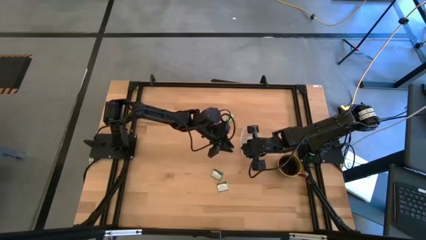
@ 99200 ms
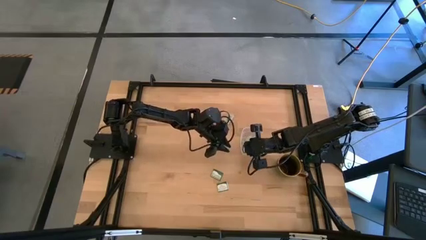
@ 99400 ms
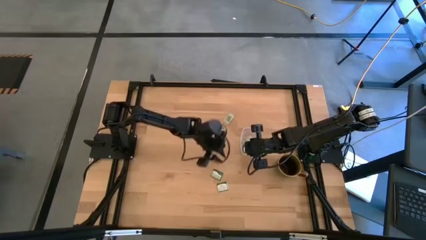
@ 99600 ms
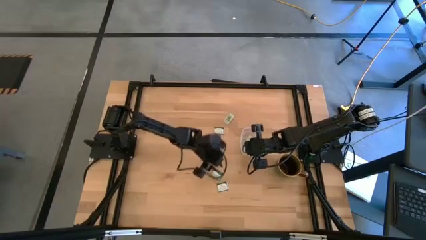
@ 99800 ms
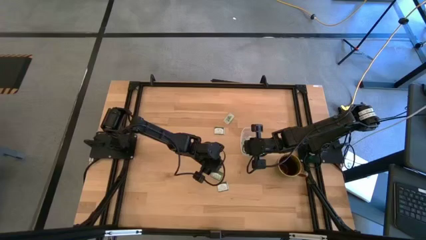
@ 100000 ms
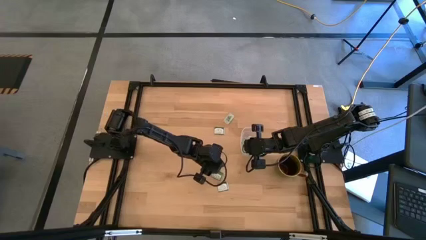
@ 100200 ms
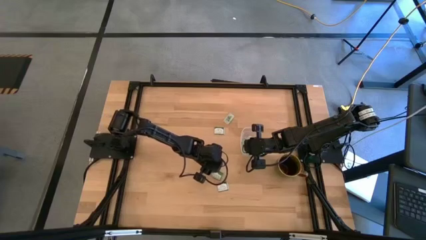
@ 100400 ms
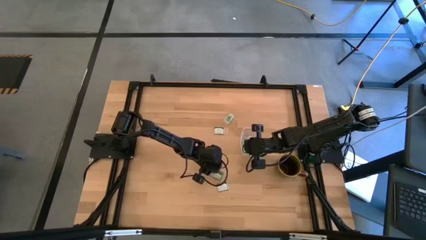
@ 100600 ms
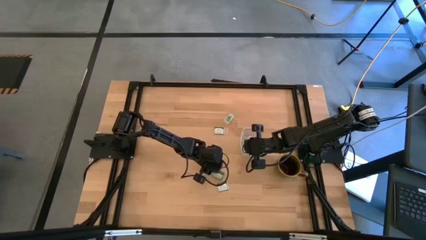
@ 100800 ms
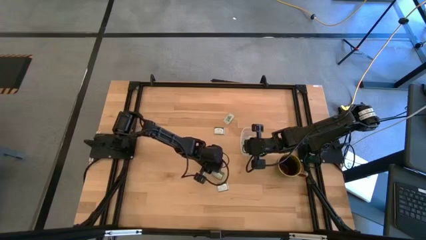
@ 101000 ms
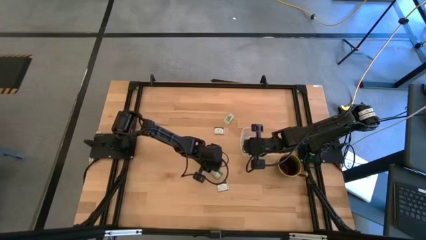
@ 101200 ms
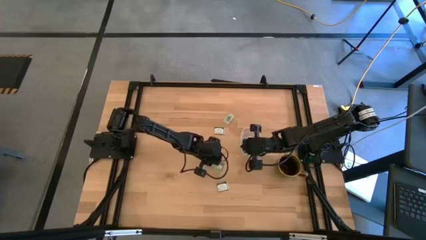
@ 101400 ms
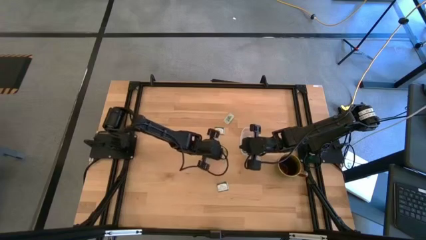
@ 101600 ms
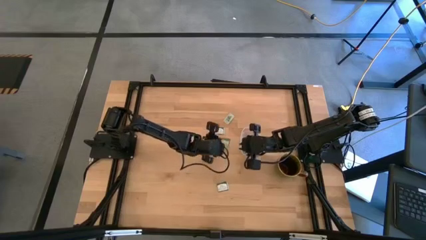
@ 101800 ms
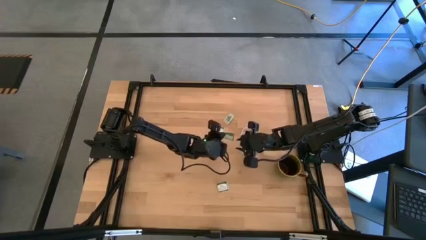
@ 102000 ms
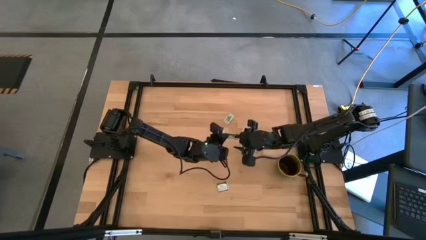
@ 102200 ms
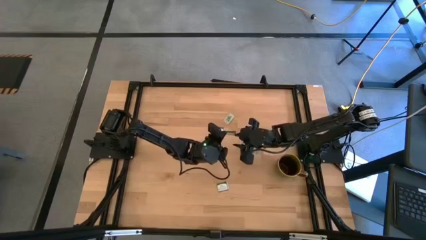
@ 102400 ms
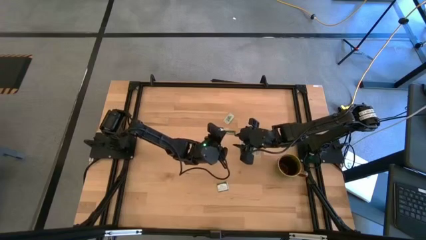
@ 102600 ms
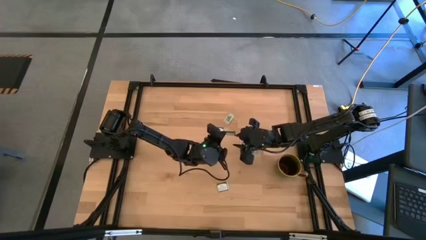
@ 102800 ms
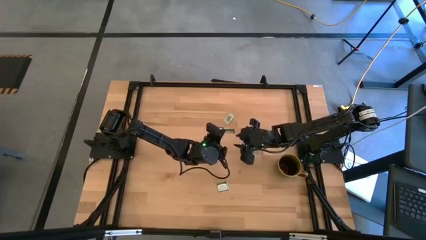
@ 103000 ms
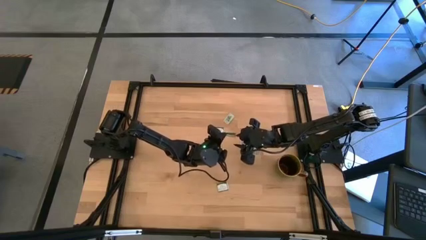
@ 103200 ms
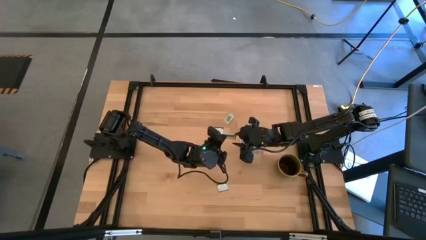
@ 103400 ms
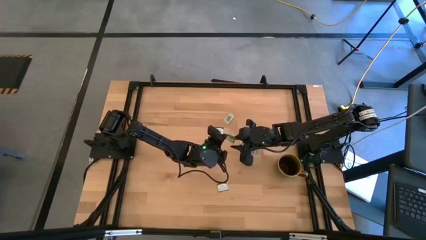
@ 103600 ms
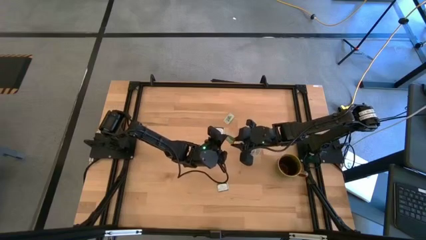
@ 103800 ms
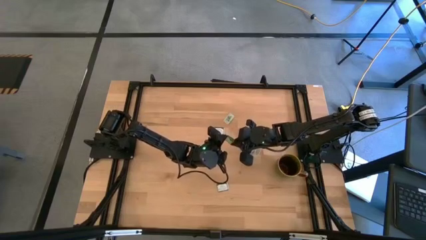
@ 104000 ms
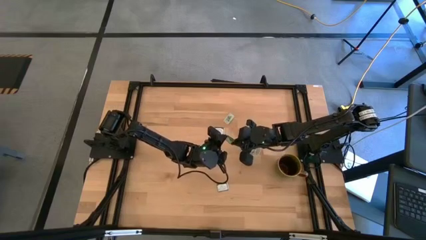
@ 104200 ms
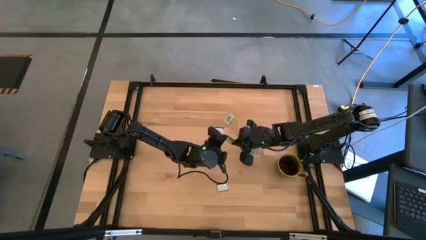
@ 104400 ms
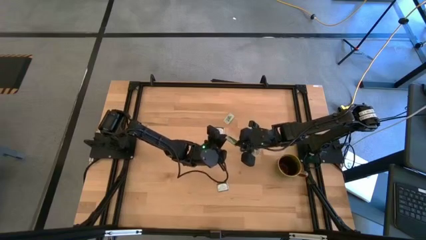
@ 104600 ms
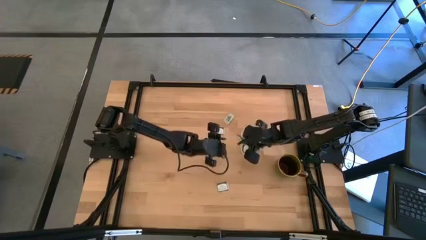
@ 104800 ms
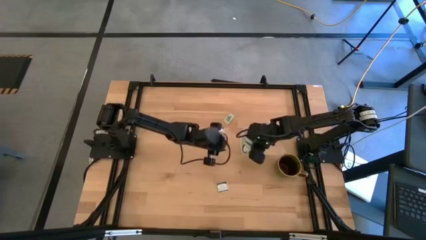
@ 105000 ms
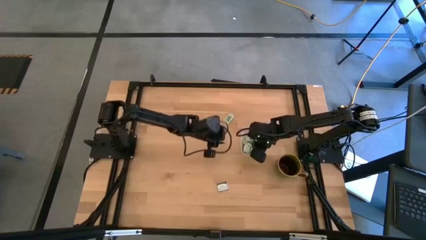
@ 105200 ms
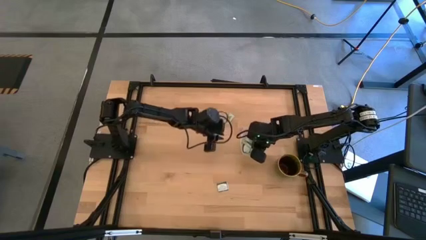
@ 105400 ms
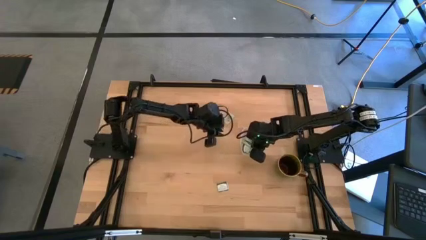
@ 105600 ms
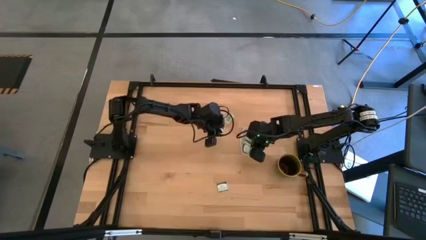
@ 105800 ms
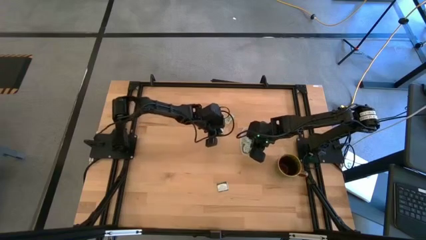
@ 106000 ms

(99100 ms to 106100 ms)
Task: Pick and place items into bin
Put the truvia packet into the transparent bin

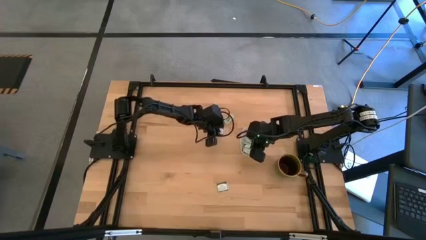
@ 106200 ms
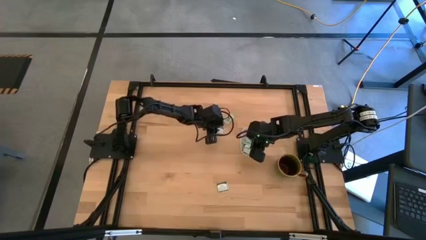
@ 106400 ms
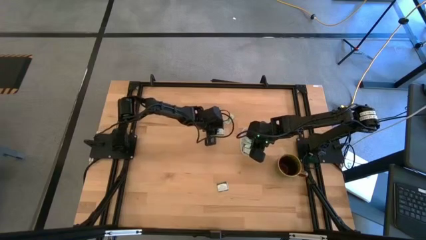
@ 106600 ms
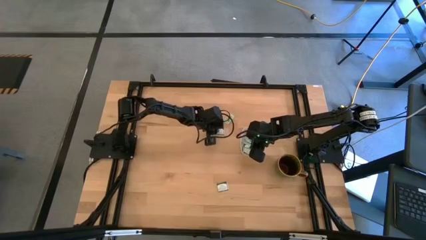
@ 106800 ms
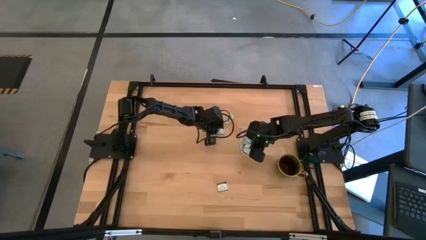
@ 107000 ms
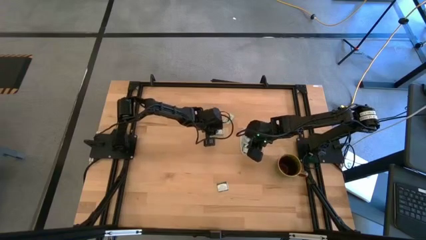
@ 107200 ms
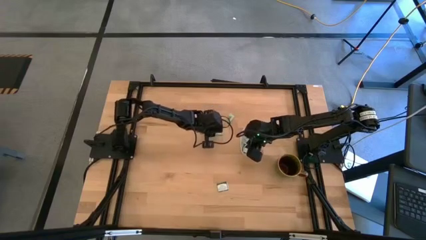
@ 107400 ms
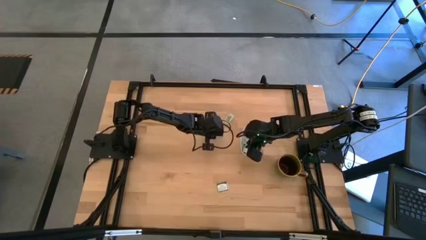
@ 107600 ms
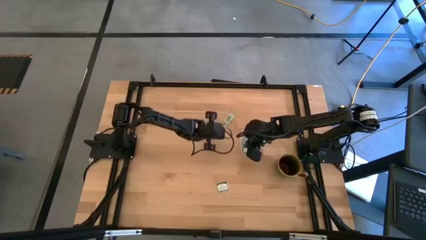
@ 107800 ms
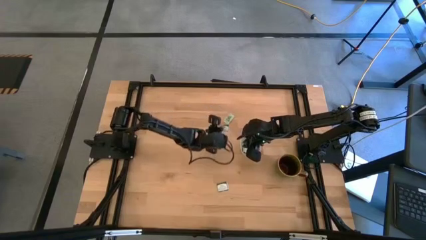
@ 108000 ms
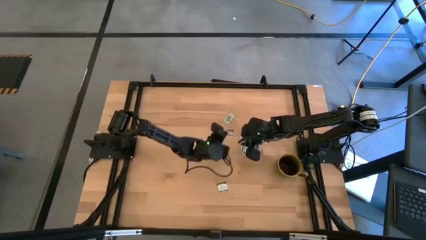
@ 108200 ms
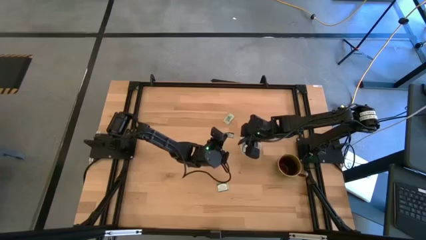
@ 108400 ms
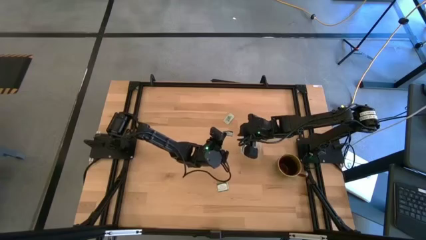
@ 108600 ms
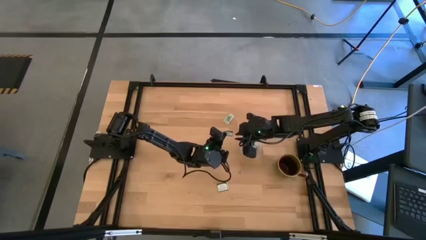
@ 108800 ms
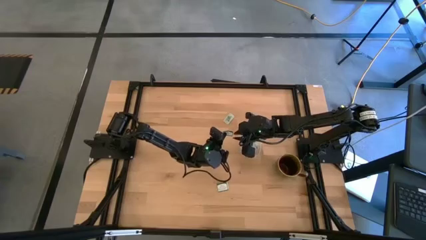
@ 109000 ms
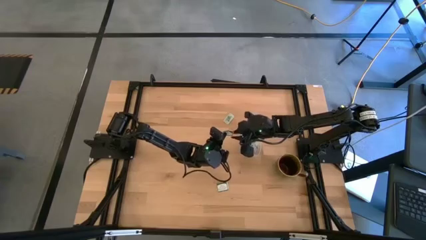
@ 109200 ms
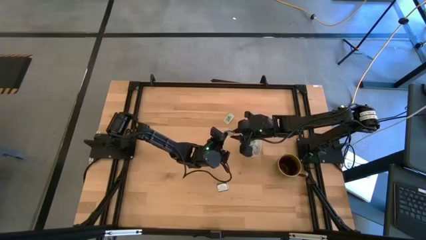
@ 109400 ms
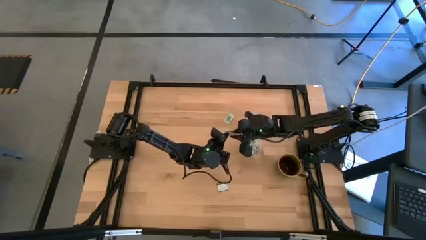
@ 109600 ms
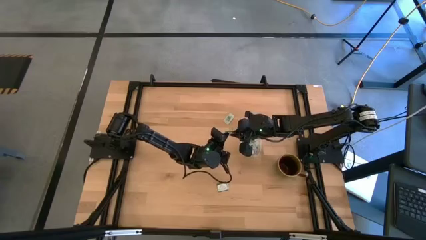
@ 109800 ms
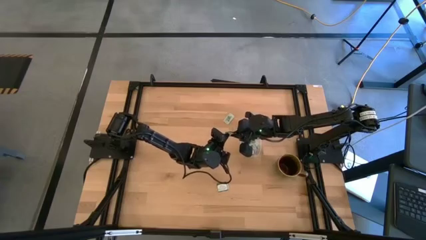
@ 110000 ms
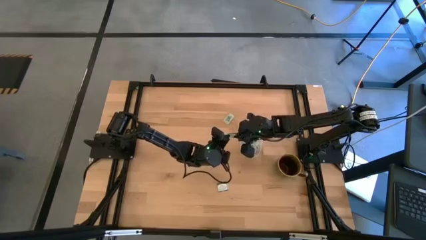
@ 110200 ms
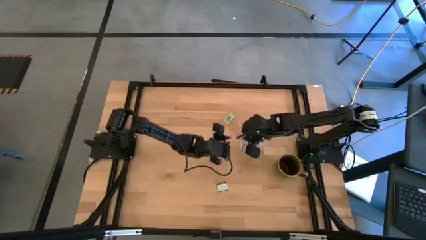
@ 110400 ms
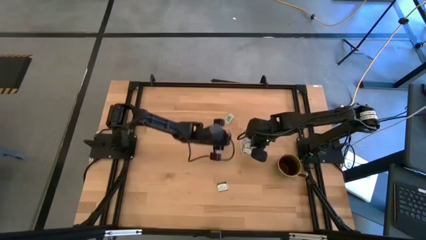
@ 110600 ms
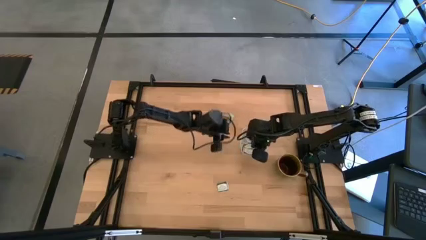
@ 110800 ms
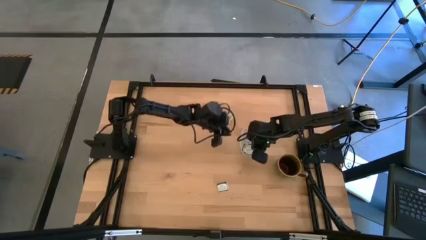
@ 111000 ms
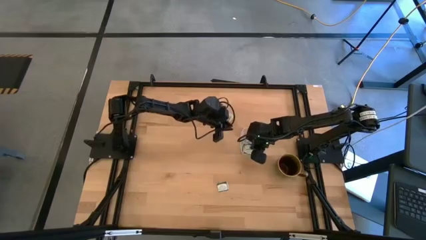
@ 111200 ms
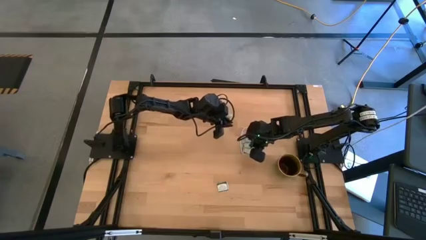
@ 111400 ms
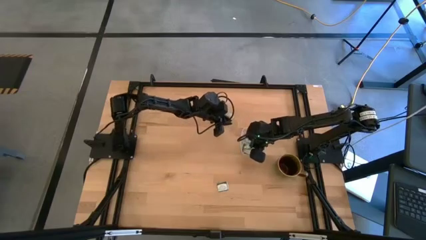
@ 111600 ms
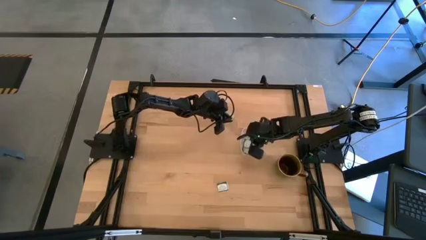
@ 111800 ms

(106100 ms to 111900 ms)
Put the truvia packet into the transparent bin

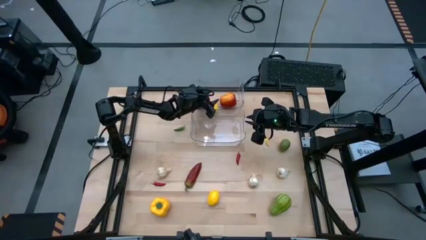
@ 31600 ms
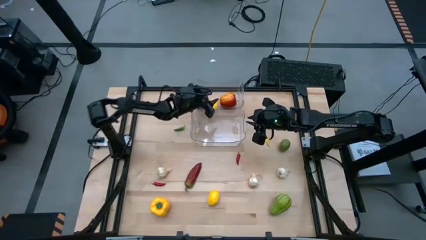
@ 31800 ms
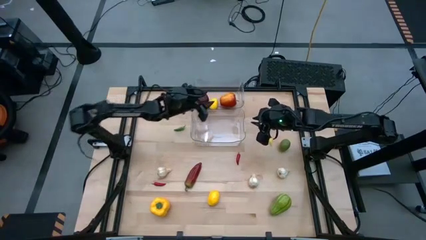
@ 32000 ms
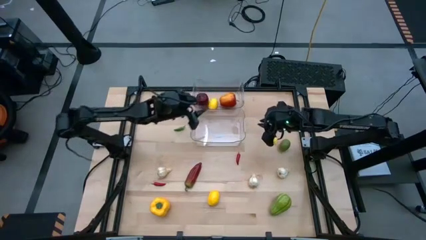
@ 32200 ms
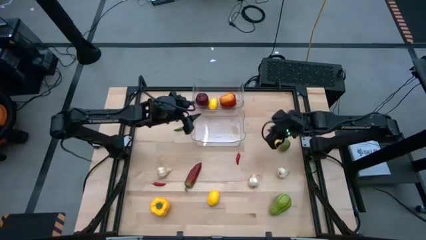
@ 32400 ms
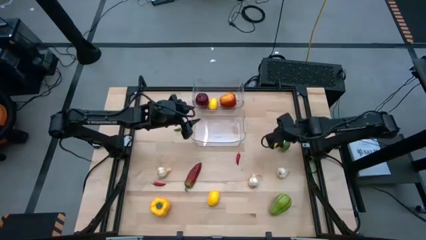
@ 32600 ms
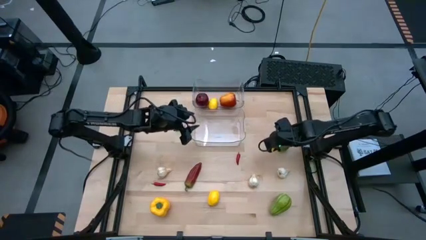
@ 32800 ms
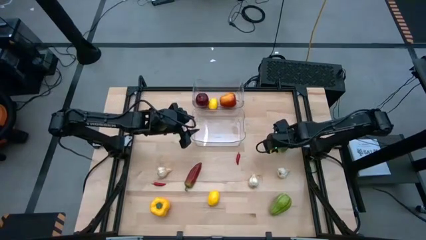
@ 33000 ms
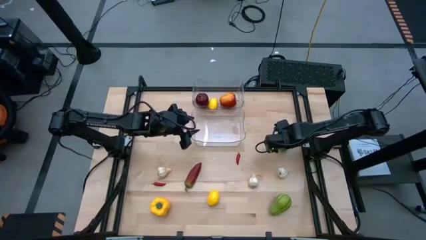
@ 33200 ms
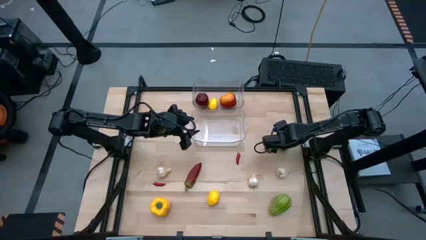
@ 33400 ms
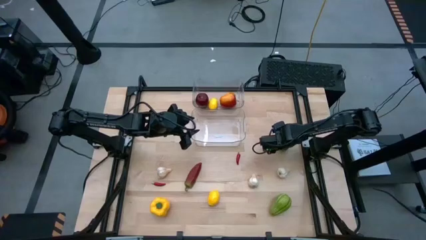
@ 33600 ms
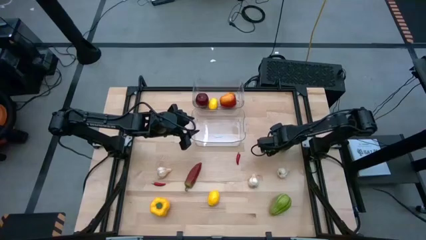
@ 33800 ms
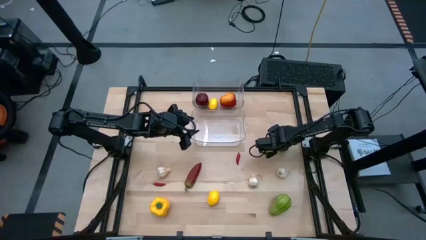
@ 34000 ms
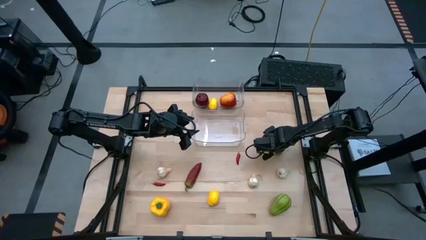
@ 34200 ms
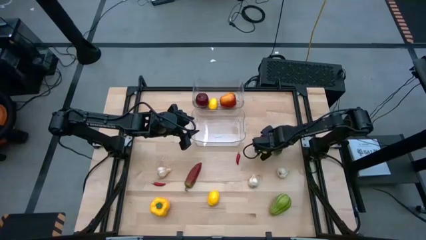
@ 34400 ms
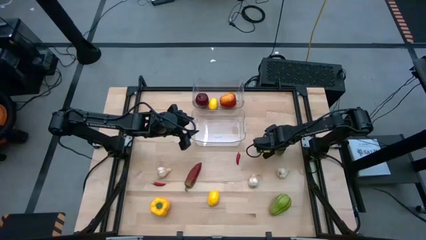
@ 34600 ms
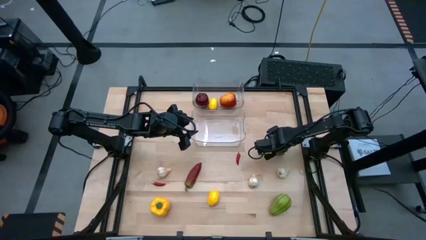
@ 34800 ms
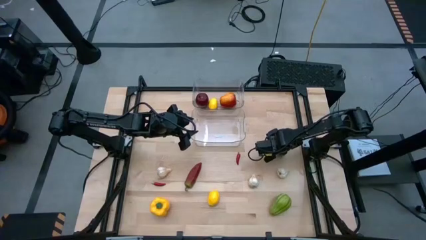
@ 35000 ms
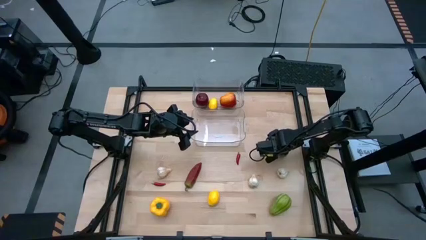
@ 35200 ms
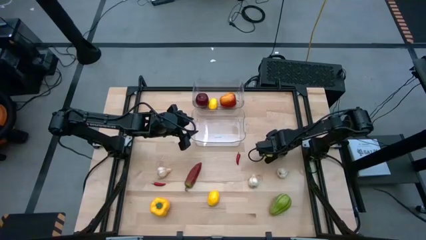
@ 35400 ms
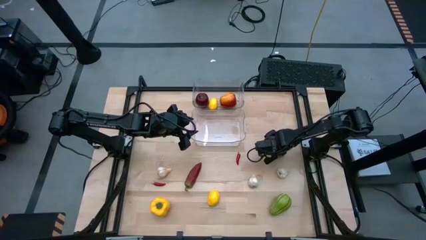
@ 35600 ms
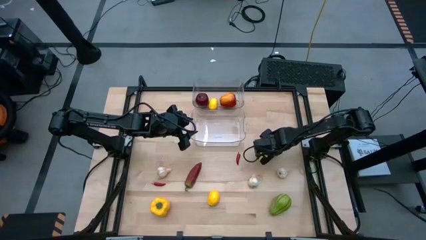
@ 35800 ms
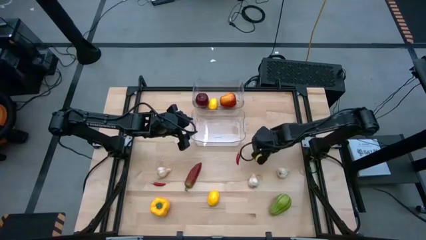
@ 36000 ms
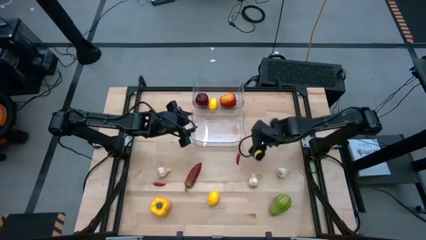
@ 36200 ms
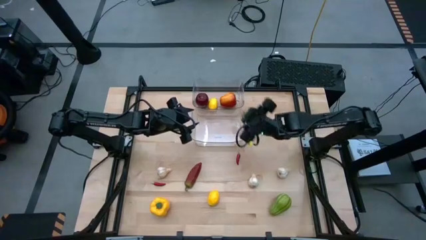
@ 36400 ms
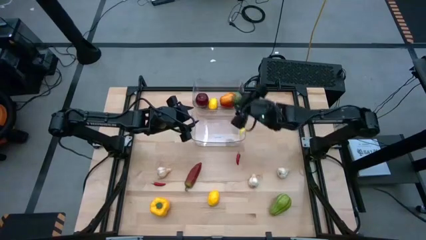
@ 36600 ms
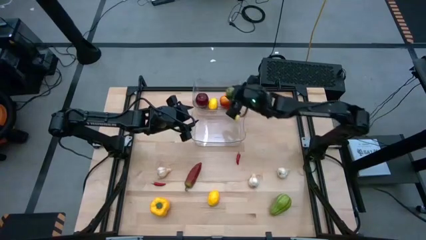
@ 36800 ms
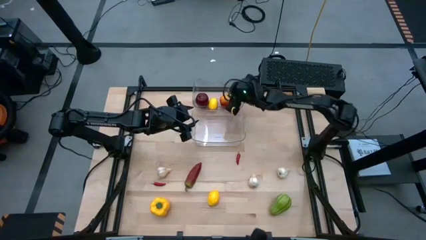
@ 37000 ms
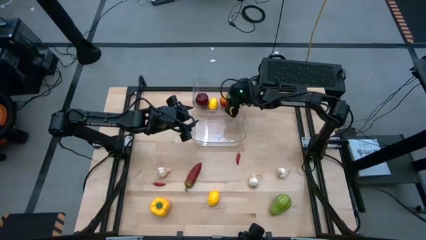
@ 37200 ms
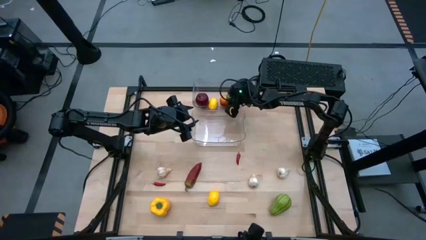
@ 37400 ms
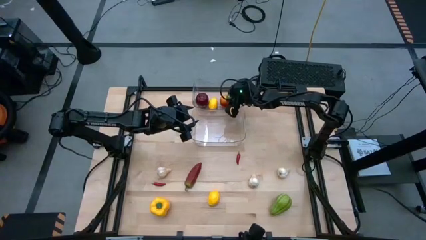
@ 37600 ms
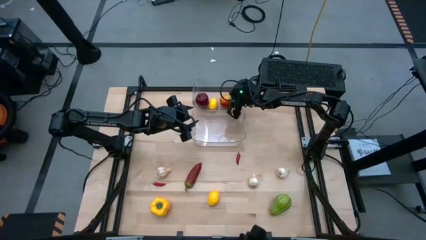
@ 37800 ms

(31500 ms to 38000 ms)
Task: Sort produce into baskets
Put the lime into the top transparent bin
